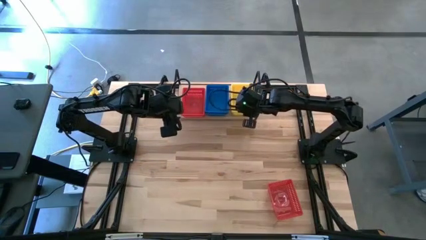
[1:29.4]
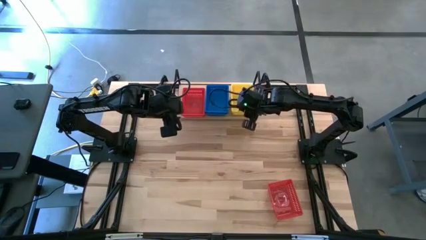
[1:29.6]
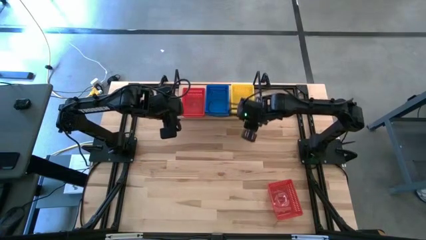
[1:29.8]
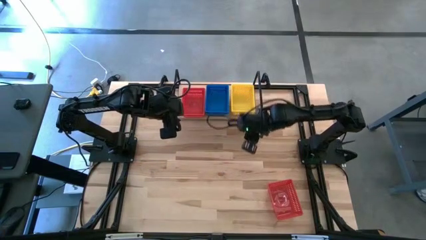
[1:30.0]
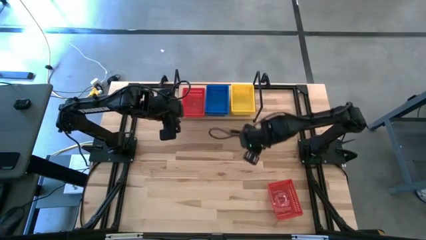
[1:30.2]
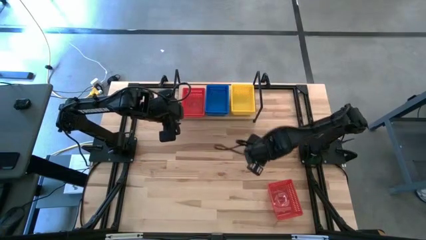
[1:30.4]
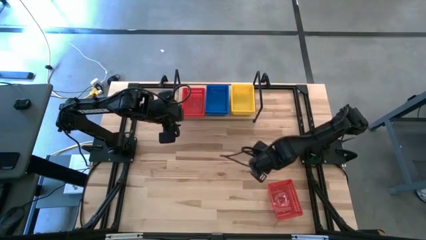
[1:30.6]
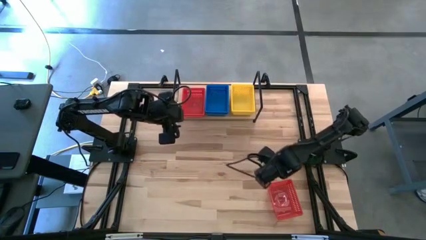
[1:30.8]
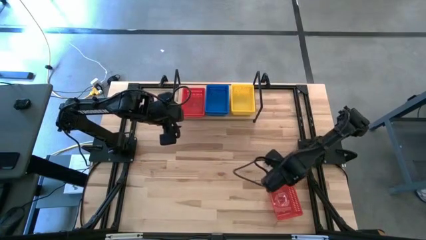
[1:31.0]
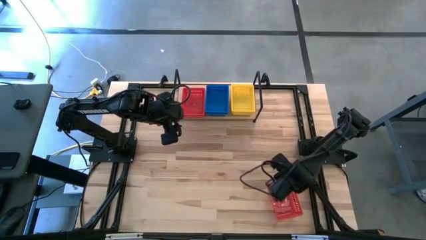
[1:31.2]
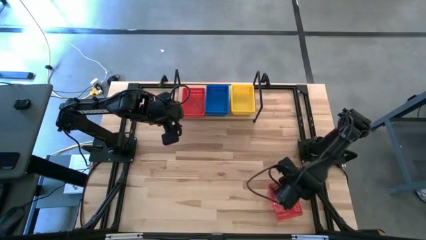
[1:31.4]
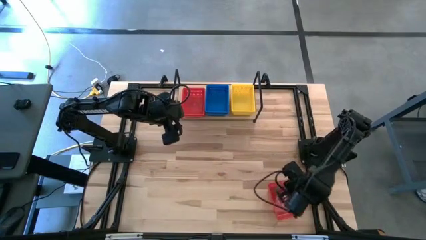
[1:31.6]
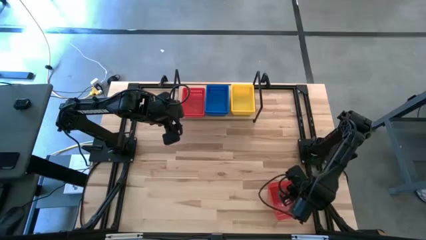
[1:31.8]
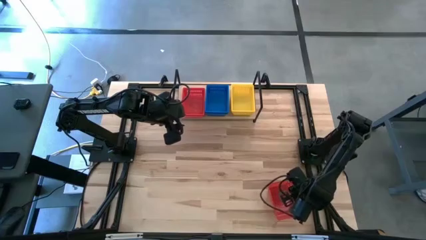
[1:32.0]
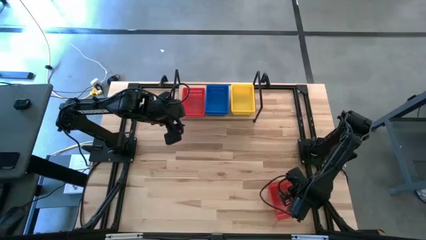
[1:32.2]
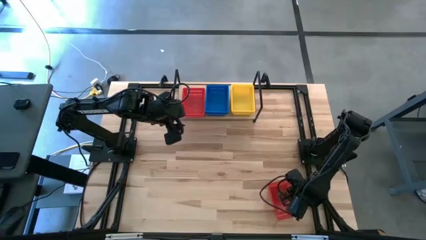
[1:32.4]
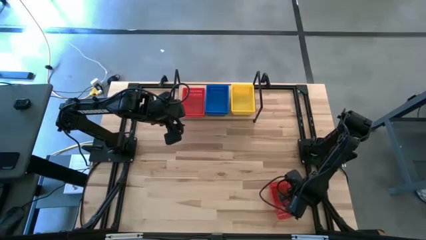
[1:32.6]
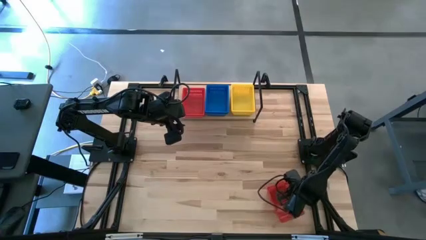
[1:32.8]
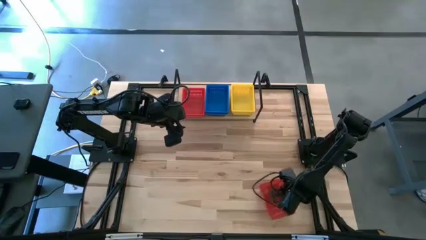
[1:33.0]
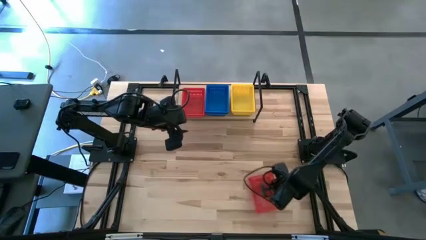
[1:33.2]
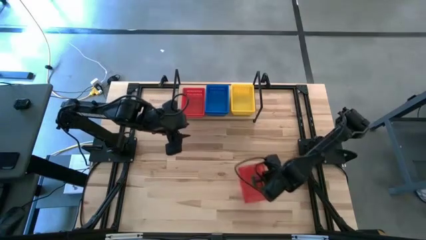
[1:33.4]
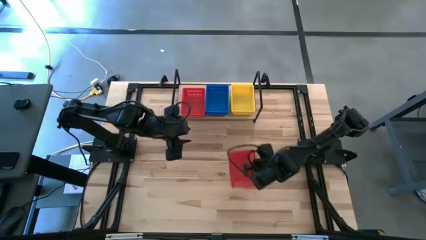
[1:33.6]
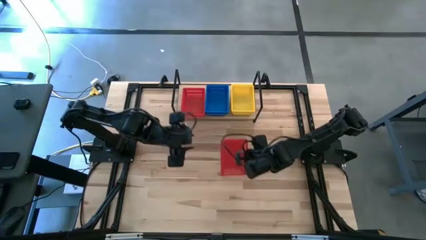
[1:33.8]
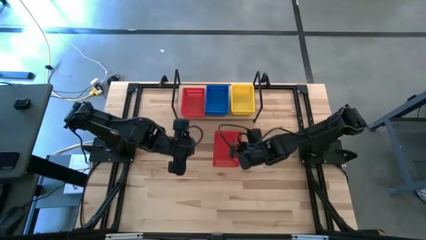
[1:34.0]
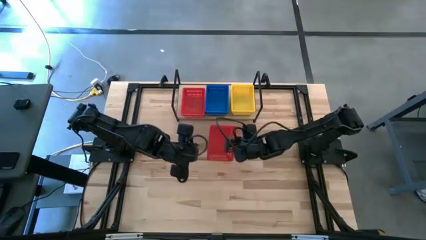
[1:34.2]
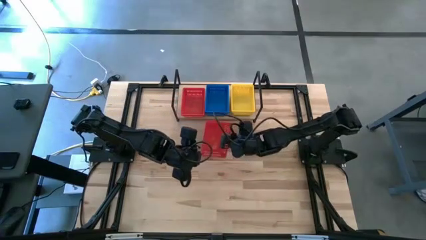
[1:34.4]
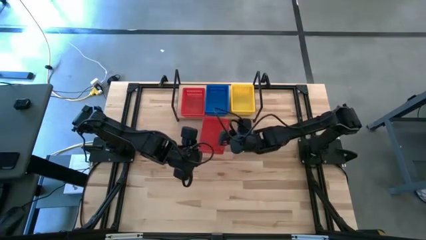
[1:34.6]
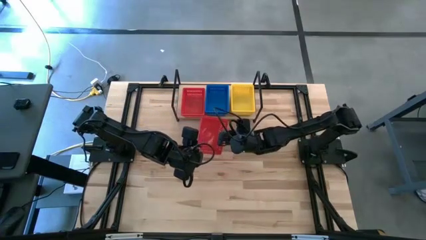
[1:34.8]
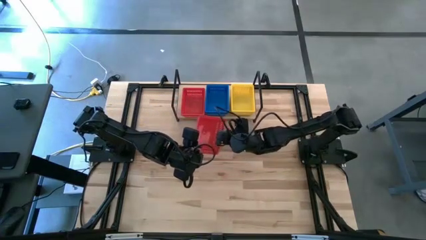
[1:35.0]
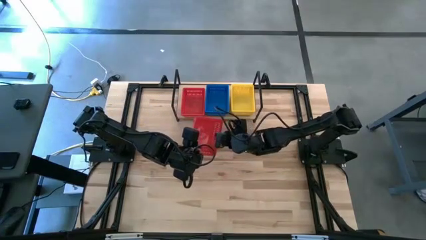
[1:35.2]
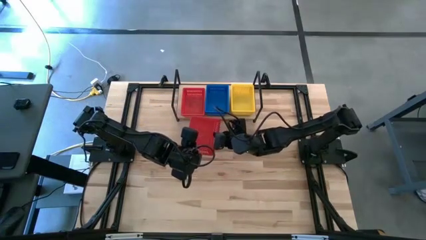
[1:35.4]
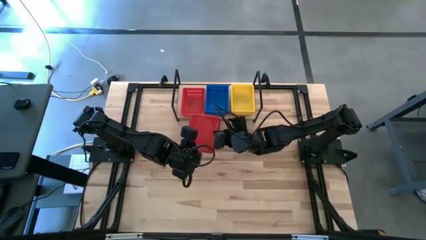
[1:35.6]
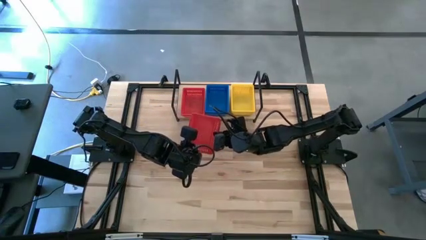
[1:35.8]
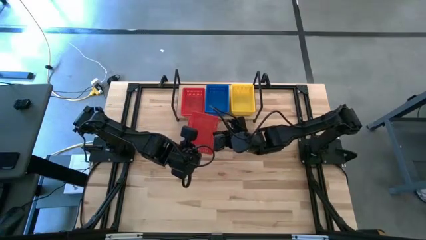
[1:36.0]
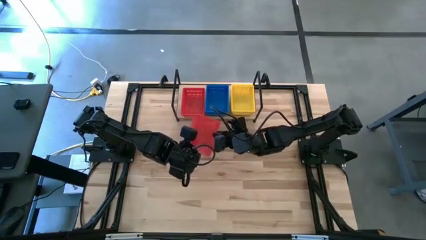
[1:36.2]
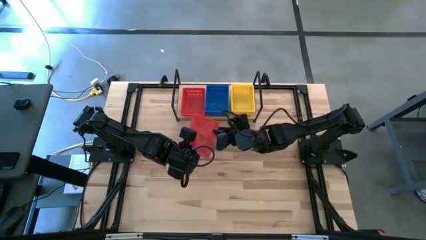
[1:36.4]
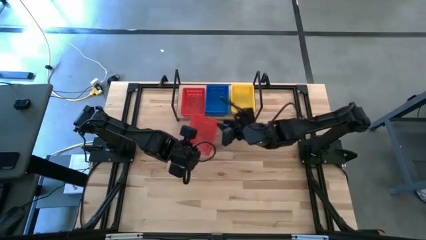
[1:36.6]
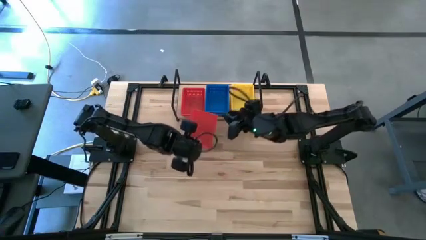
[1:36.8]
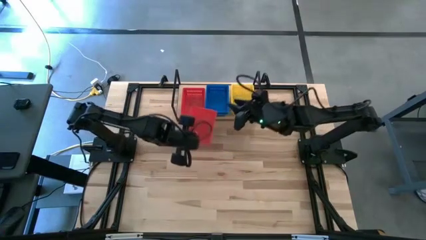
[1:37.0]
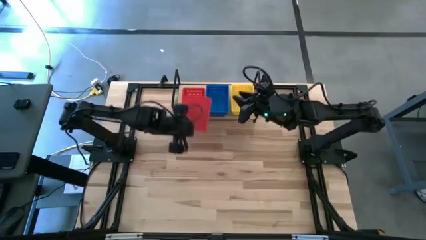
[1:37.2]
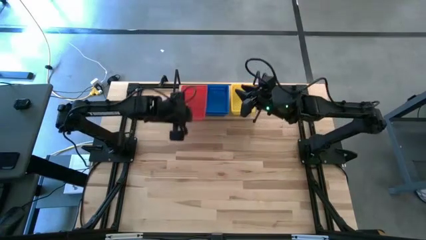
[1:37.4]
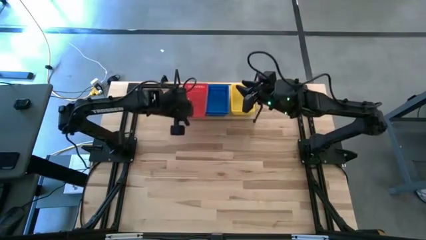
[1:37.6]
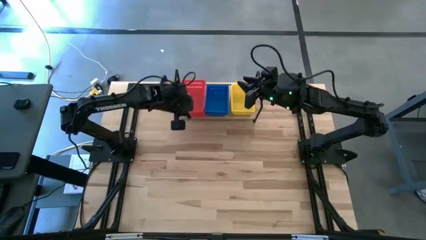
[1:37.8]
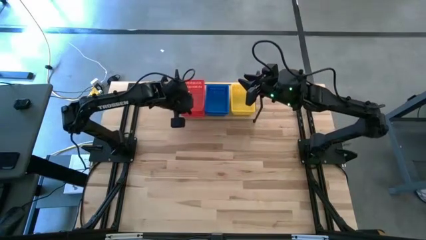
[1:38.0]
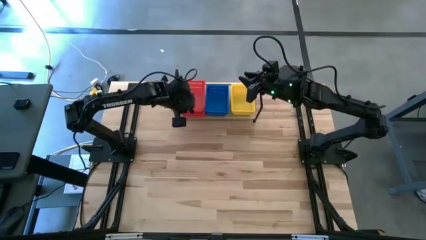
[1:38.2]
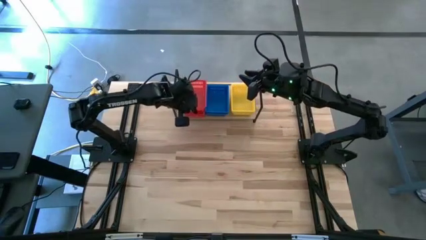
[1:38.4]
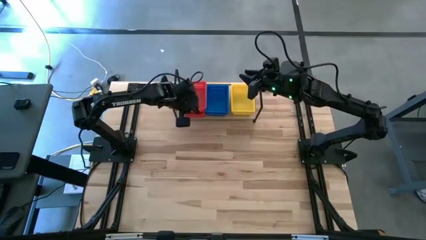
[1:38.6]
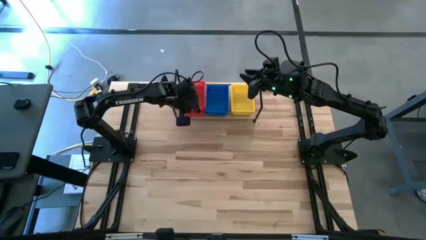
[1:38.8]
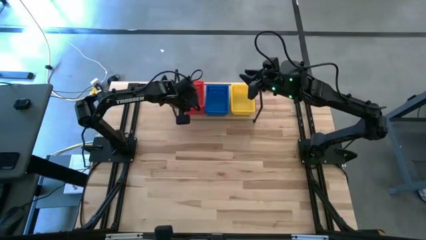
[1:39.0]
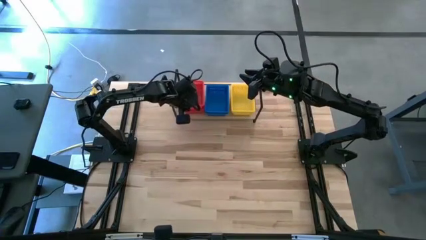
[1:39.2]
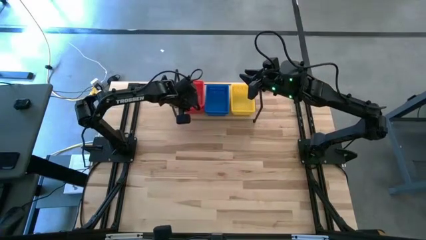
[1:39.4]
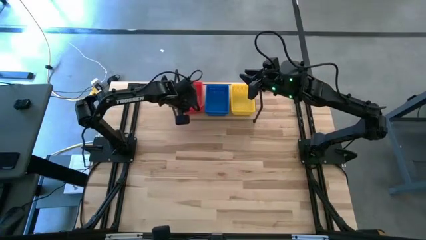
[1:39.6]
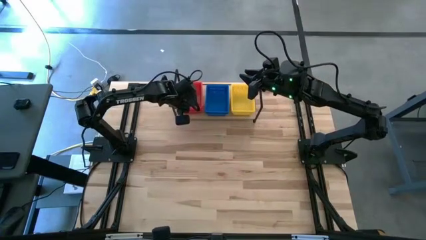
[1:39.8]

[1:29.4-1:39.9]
Task: Stack baskets on shelf by color
Stack the red bin on top of the red bin on the shelf

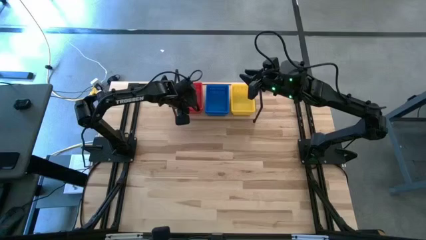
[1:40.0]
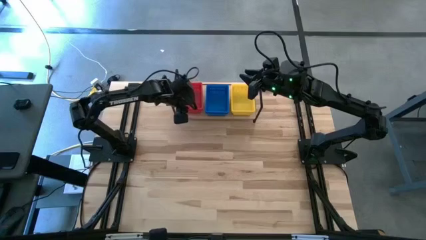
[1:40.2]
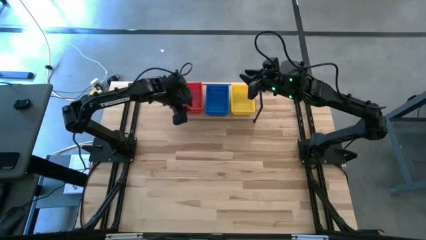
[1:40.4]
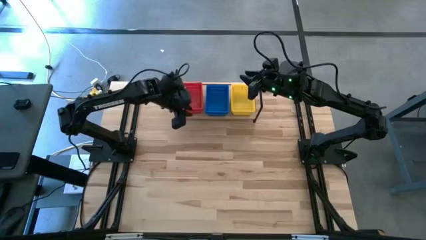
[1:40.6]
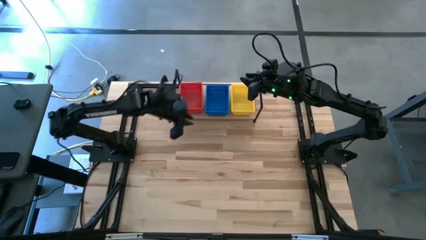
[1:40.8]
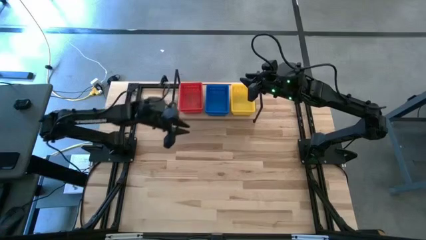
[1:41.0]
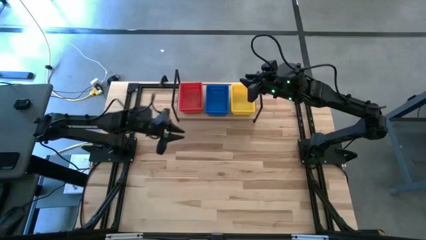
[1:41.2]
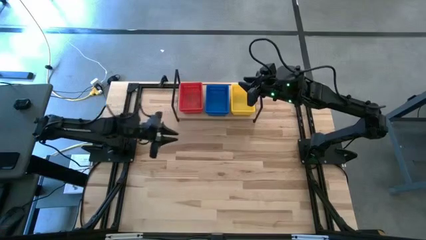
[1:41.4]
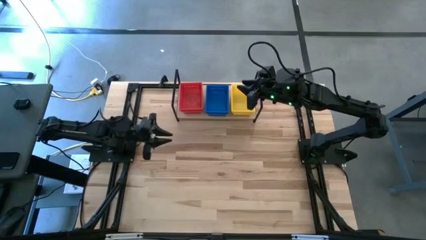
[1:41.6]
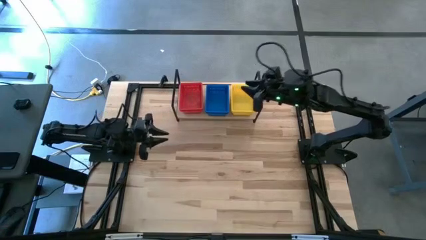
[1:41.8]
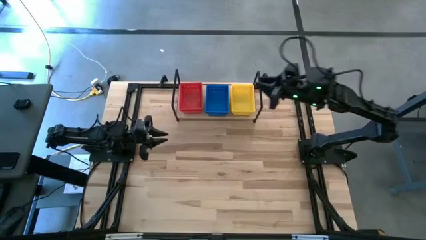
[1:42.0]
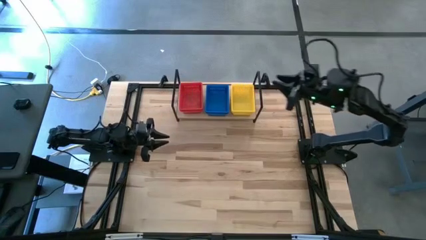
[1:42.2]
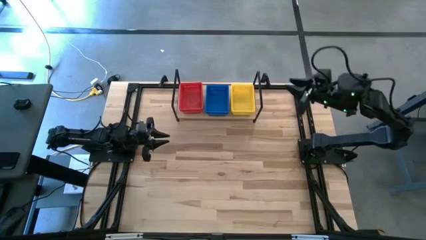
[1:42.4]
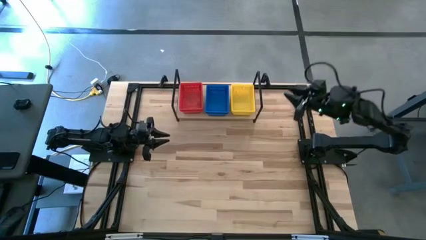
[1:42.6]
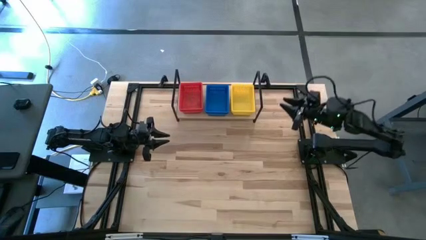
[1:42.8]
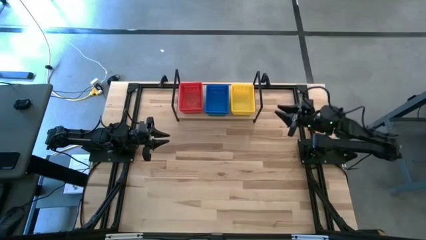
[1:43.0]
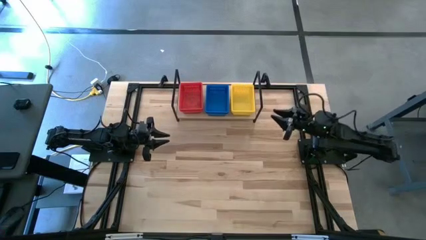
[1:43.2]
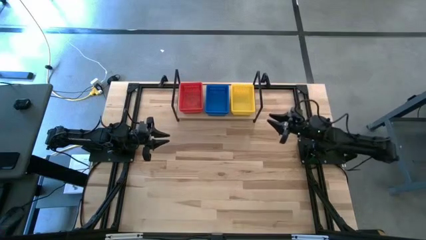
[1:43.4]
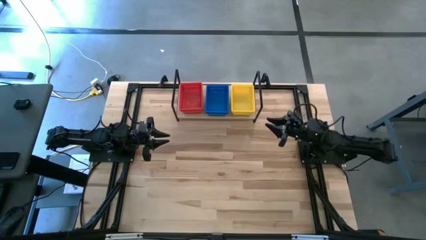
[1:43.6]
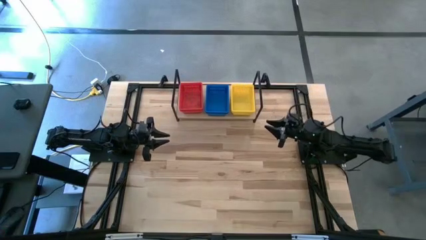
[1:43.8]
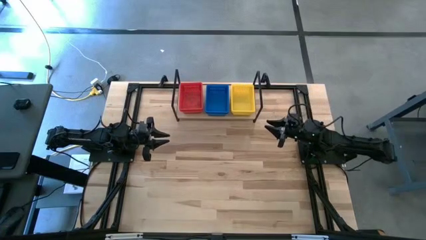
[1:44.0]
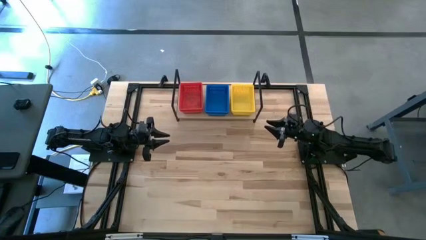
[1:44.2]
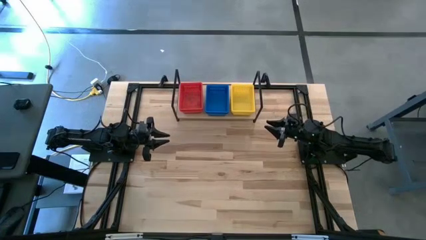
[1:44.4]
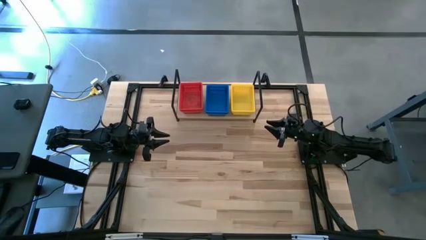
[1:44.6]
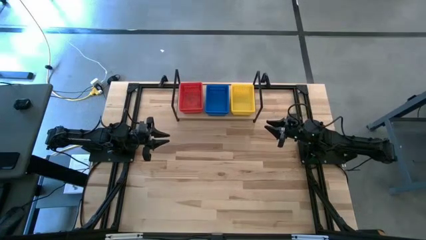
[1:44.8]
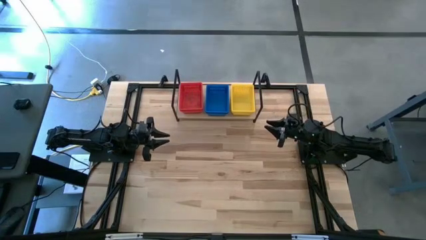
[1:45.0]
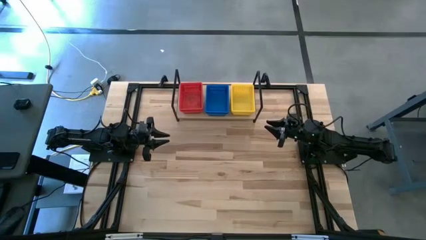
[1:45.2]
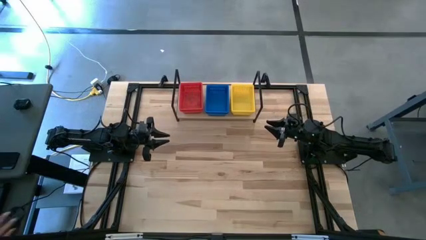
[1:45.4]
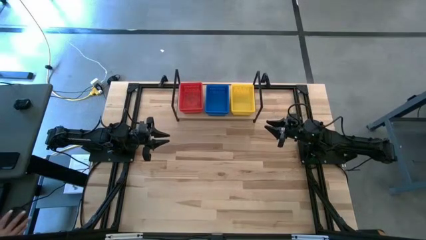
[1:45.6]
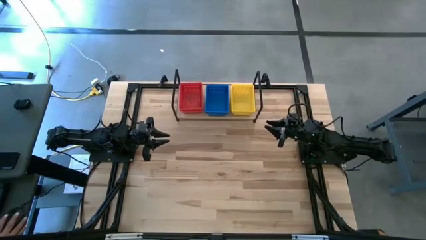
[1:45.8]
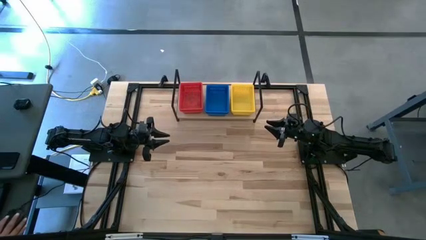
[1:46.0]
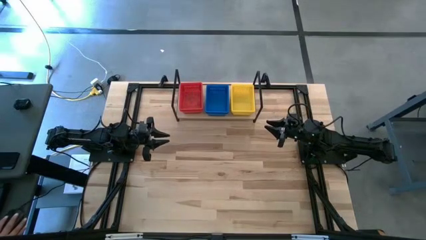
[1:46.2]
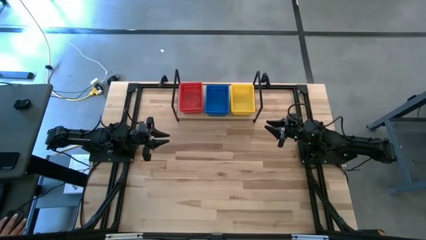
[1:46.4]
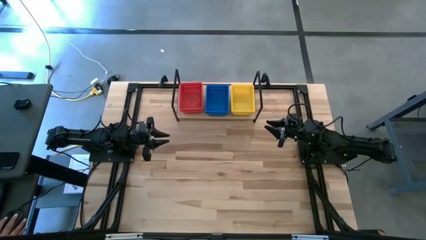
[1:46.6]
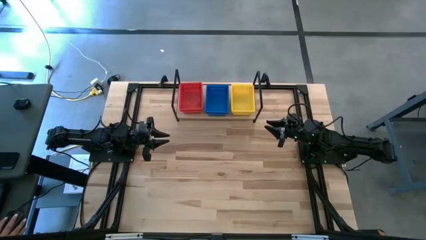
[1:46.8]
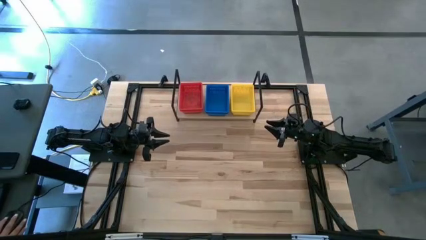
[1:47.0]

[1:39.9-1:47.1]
Return to Home Position
